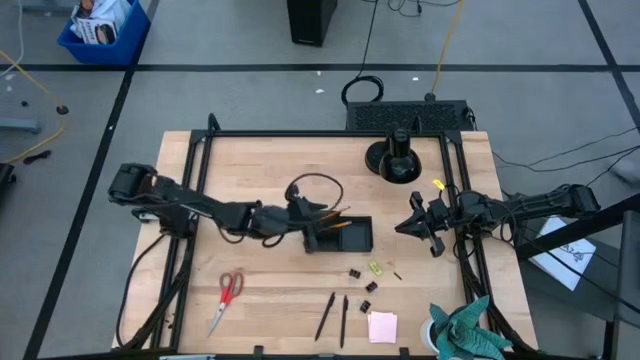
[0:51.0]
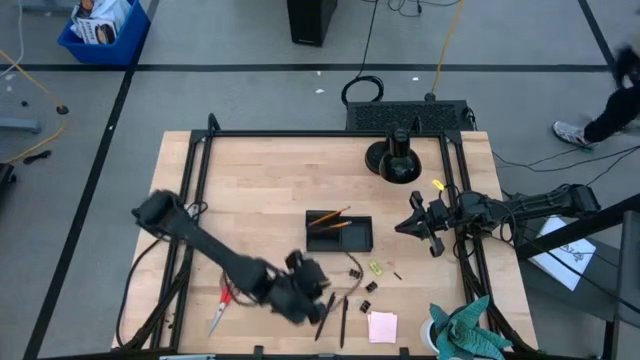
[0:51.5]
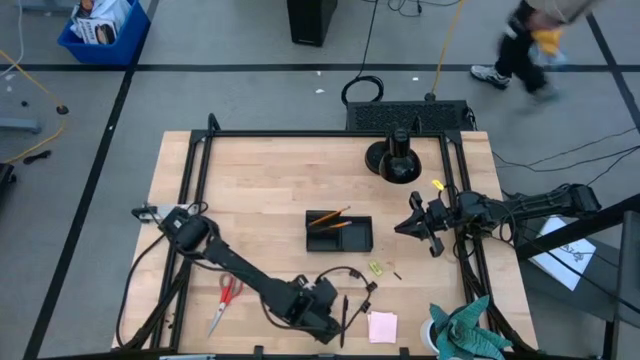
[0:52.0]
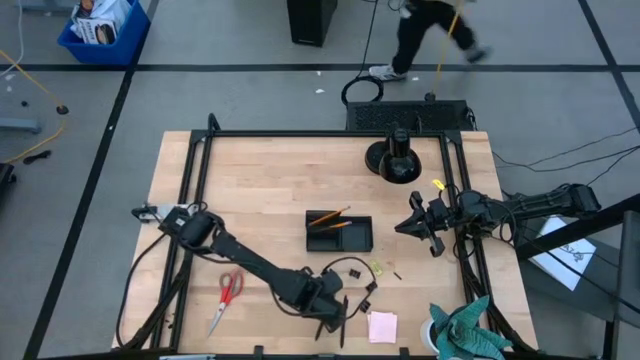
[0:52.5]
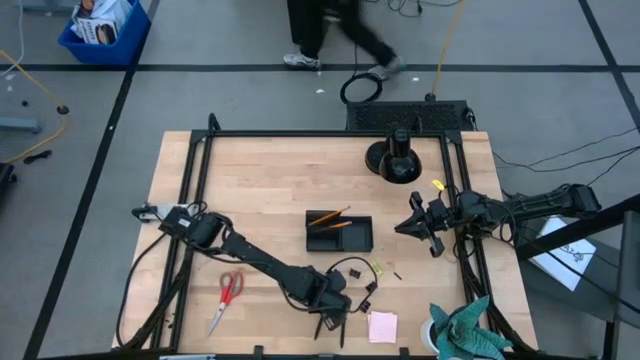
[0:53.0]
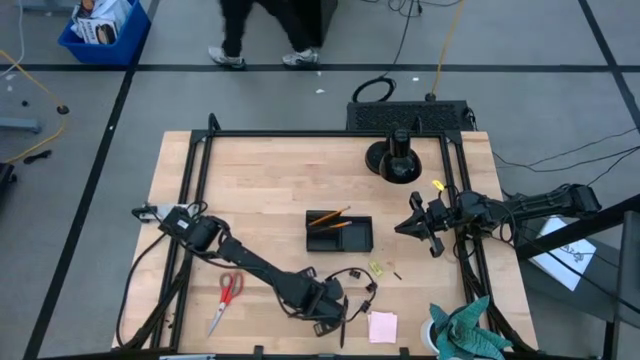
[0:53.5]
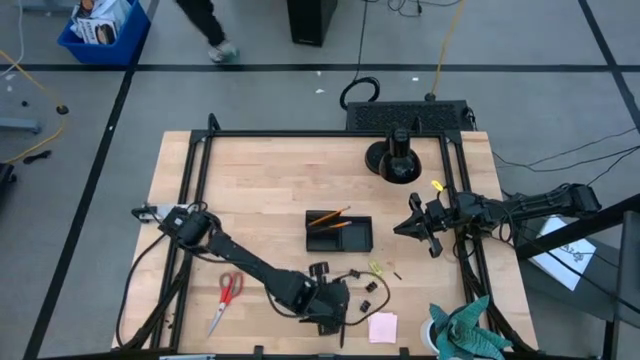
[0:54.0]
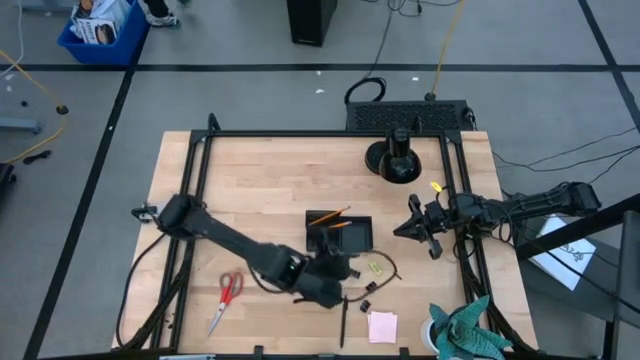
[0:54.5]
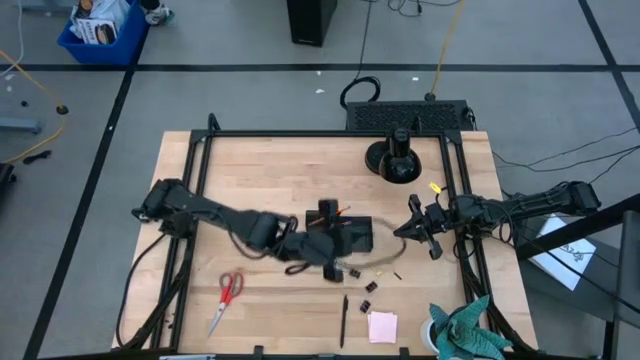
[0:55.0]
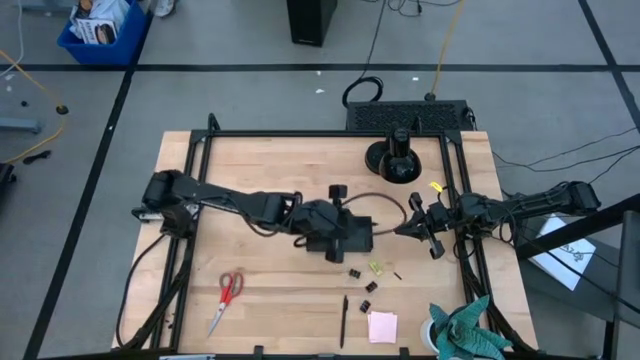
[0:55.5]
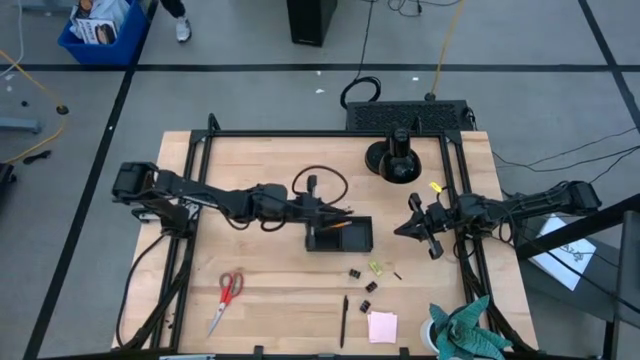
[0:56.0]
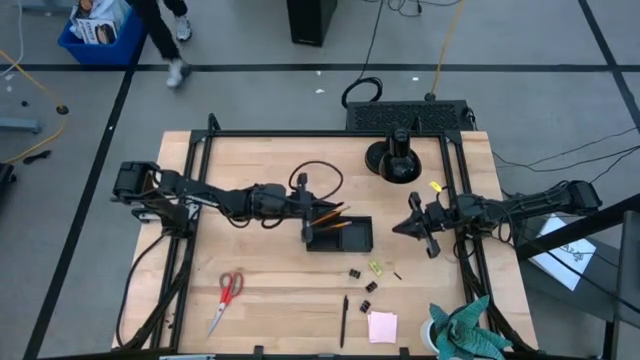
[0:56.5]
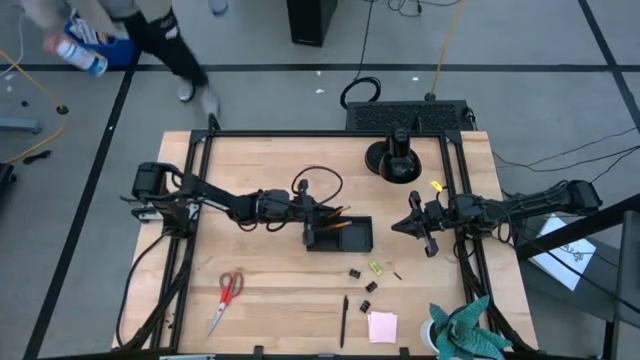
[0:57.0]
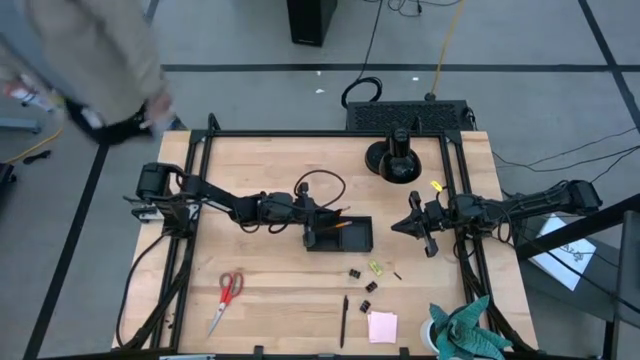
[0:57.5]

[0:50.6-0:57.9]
Task: Pick and place office supplies into organizer
Put the black pen into the black desk organizer

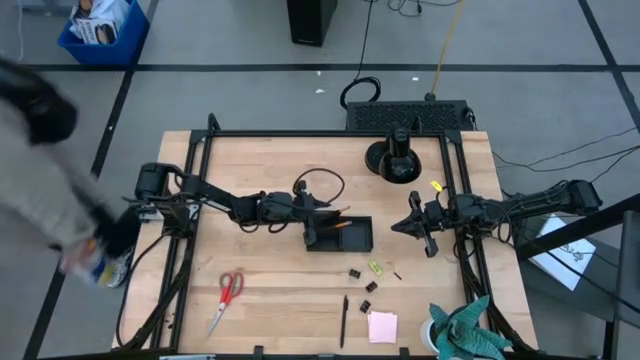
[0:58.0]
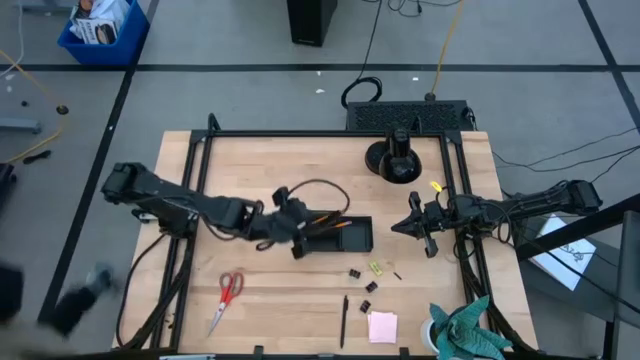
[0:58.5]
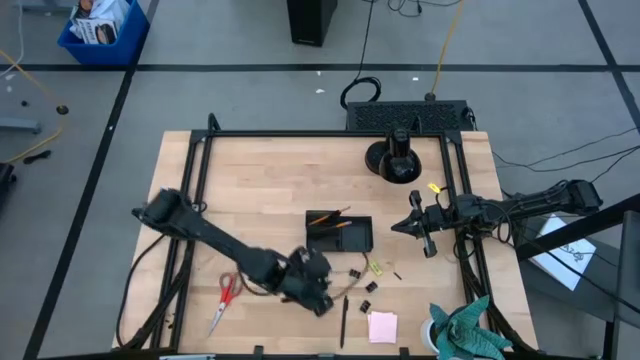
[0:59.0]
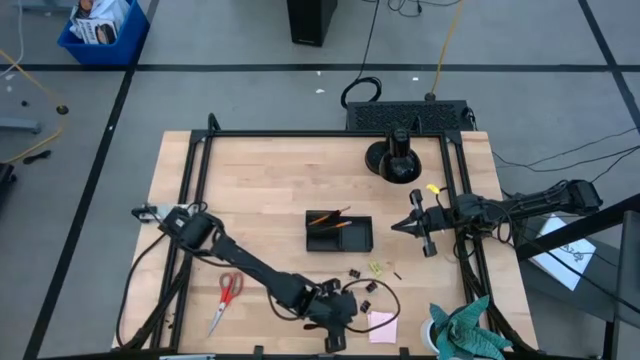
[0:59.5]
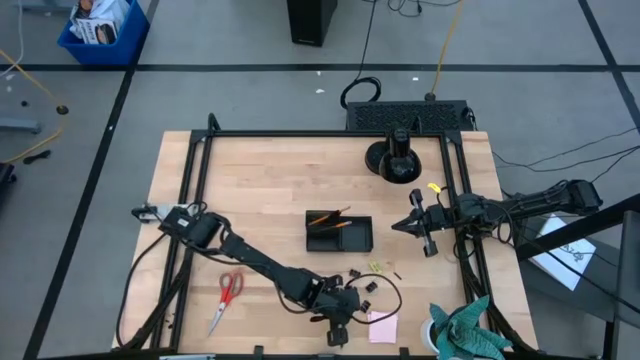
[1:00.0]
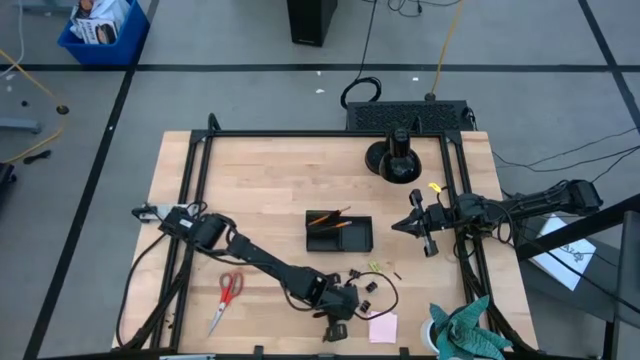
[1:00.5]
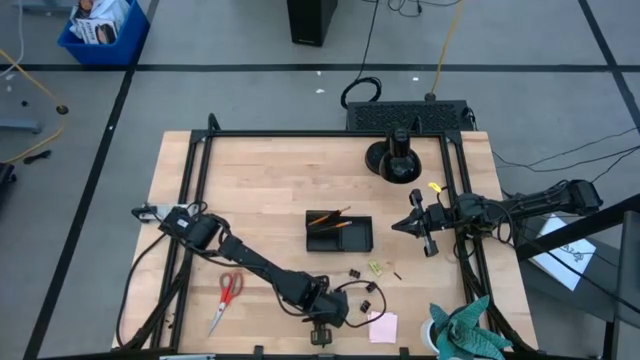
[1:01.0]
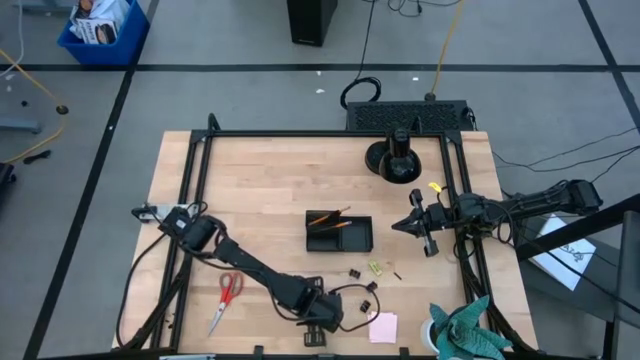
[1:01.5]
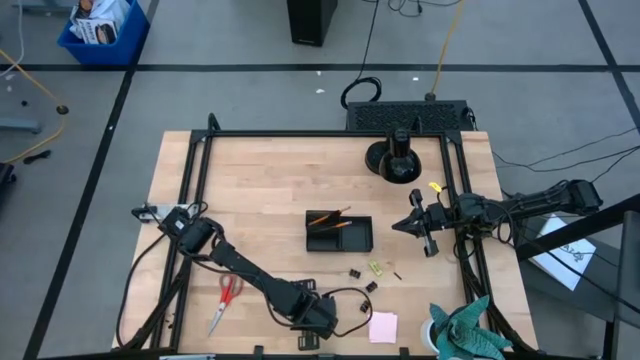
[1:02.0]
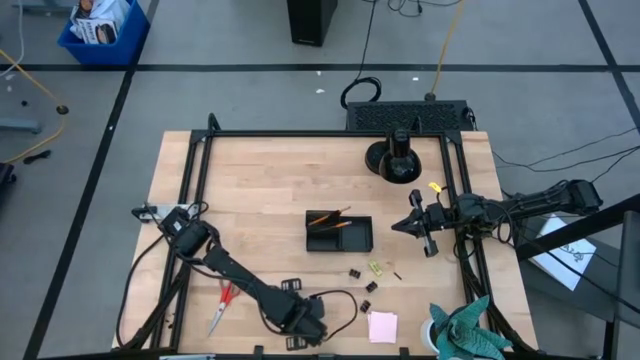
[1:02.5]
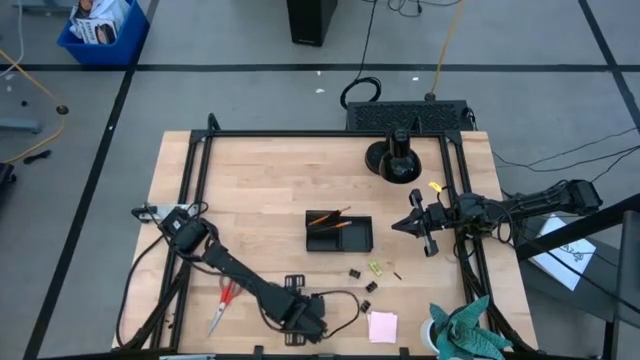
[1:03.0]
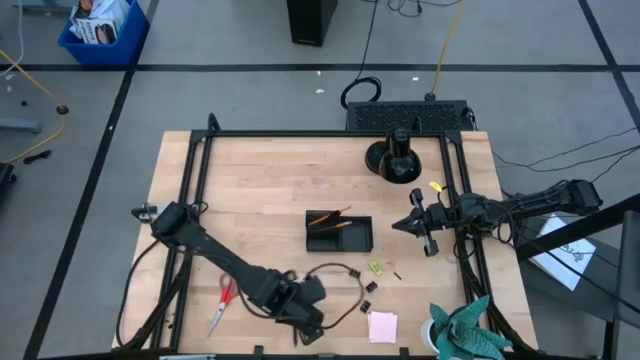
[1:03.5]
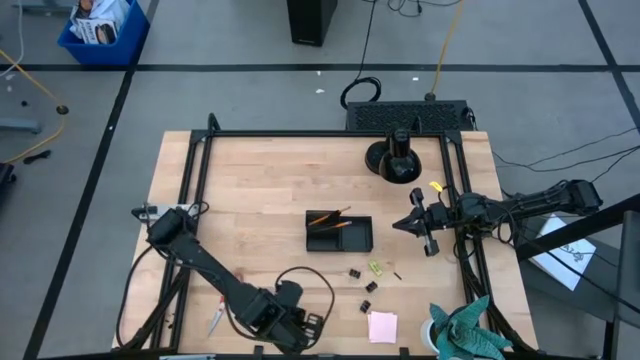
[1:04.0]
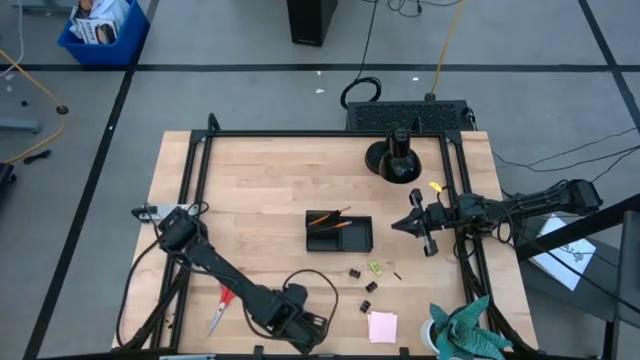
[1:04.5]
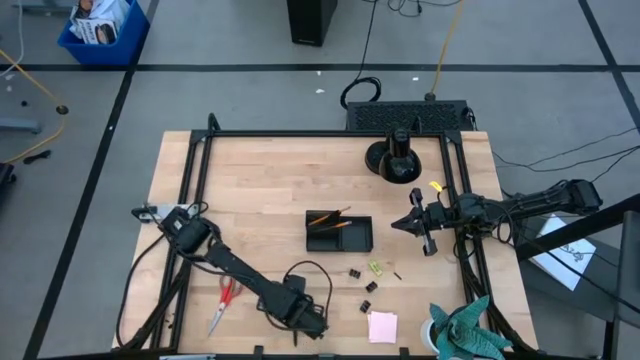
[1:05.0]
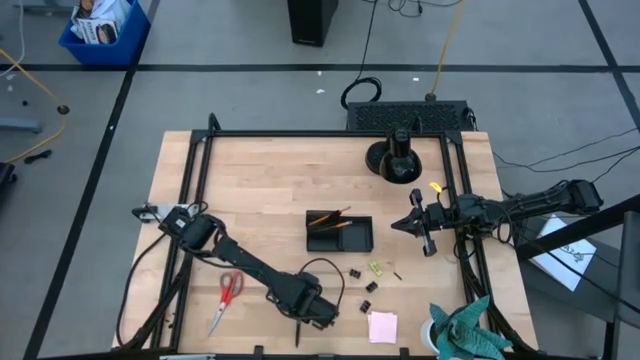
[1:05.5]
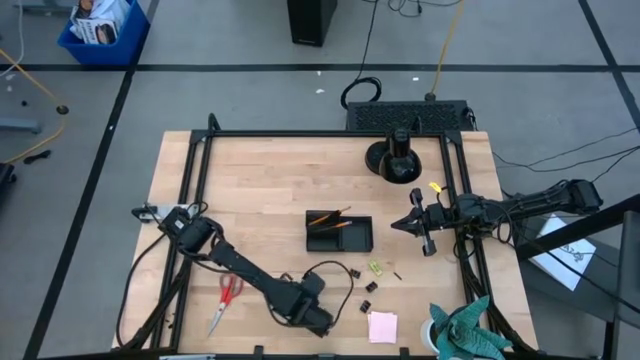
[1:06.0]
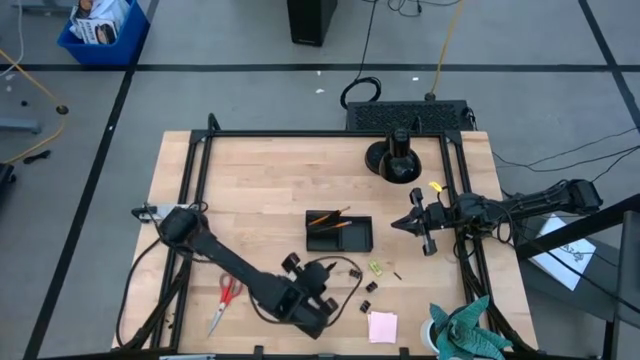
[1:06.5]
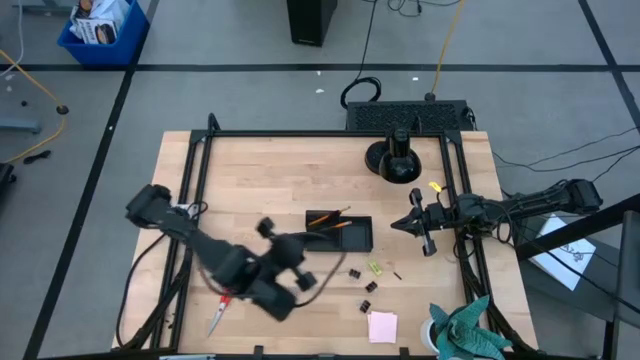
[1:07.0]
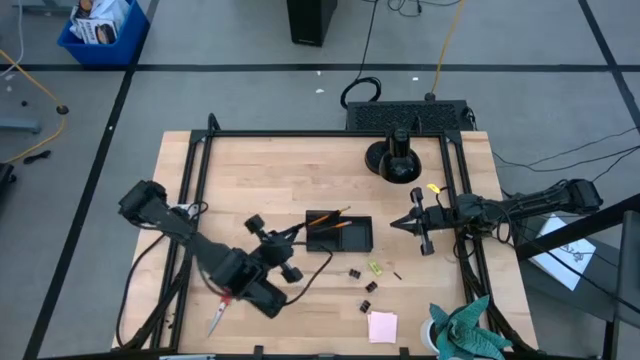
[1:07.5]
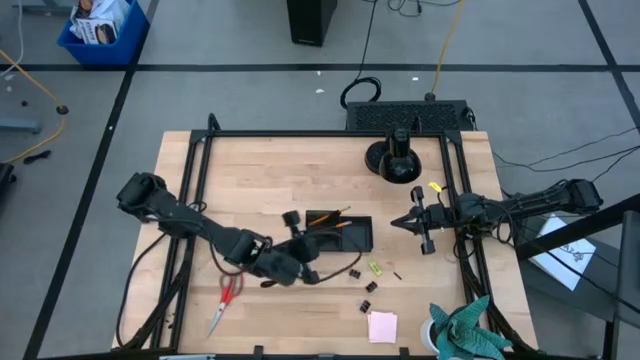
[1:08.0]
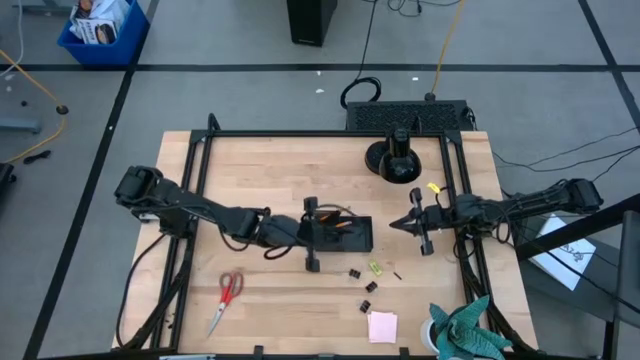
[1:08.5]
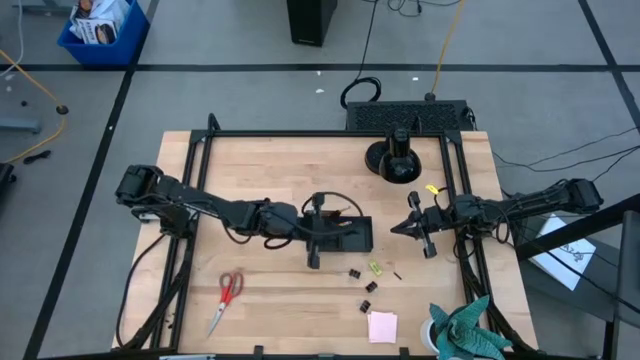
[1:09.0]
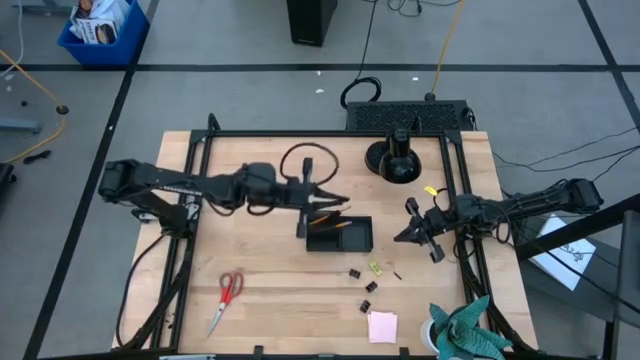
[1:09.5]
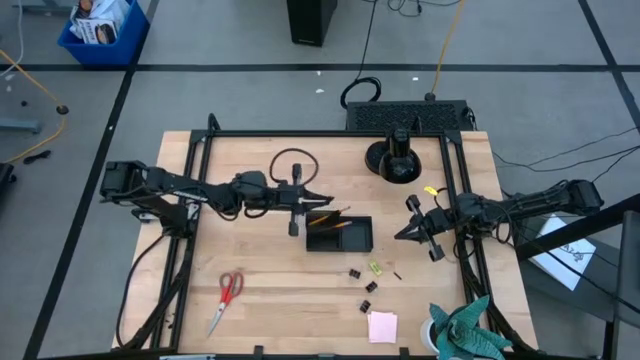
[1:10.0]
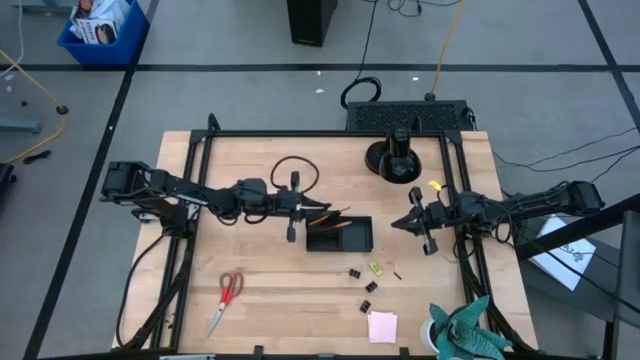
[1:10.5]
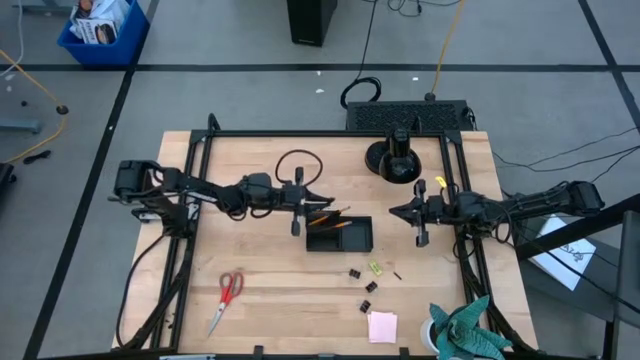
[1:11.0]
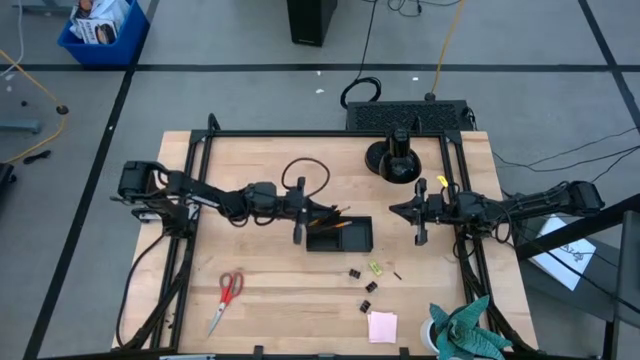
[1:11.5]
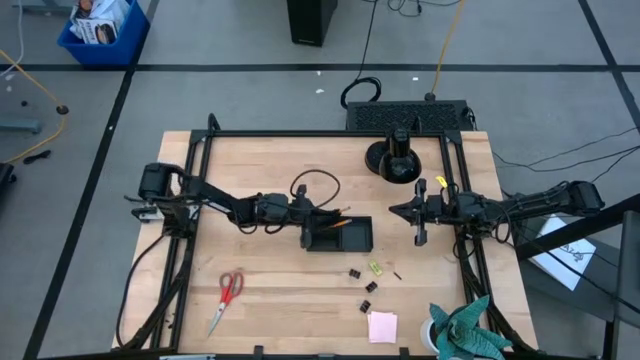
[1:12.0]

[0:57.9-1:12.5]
Put the black pen into the black desk organizer
